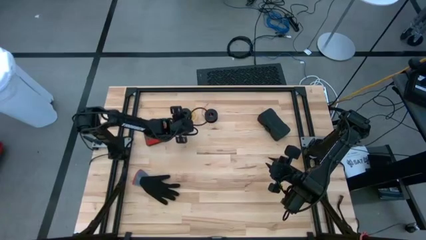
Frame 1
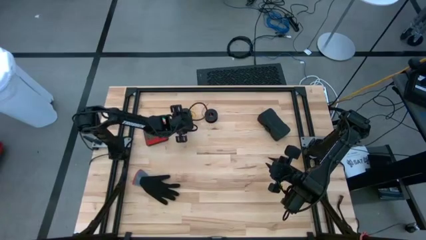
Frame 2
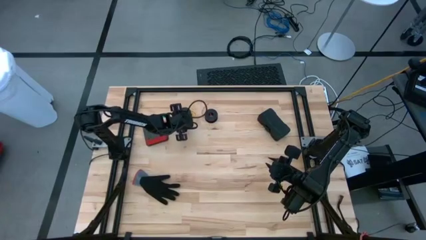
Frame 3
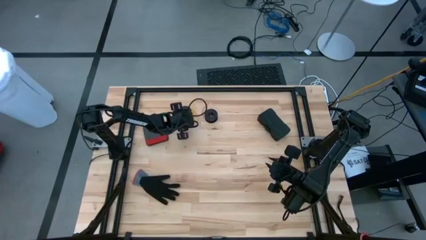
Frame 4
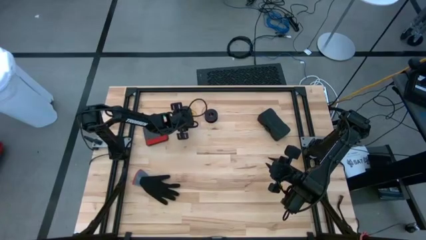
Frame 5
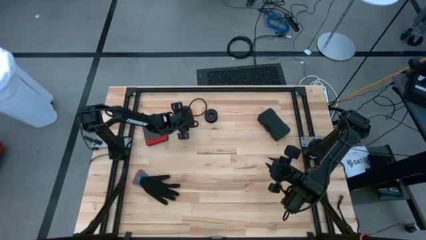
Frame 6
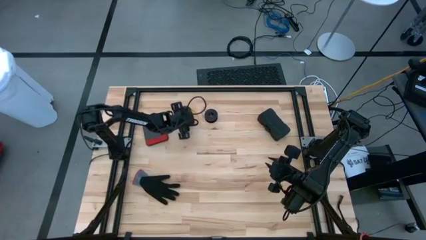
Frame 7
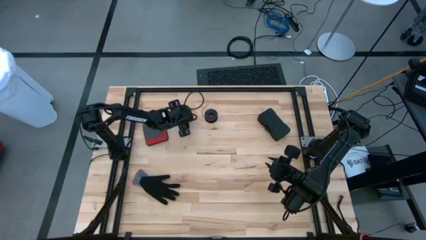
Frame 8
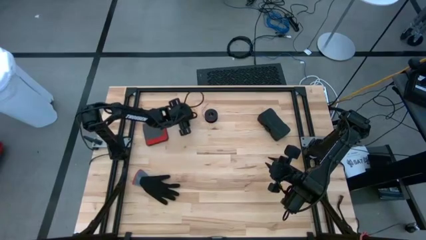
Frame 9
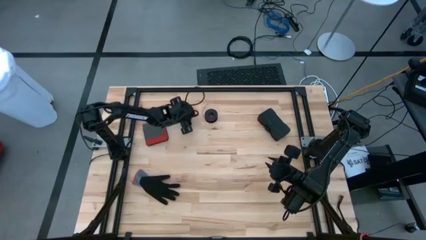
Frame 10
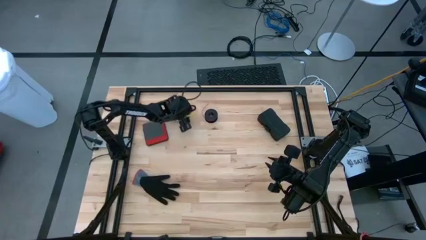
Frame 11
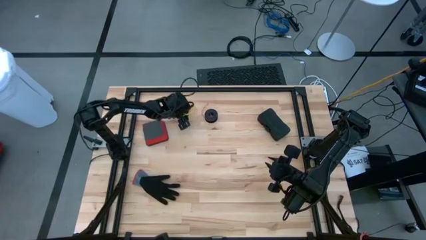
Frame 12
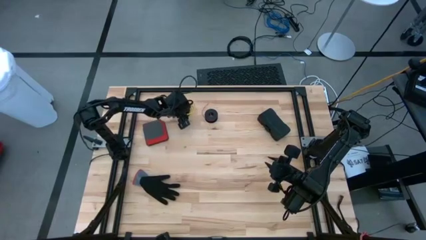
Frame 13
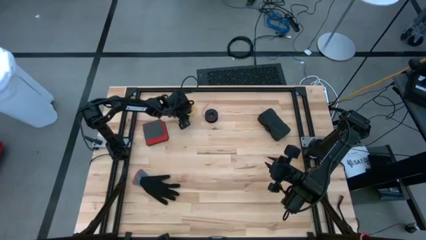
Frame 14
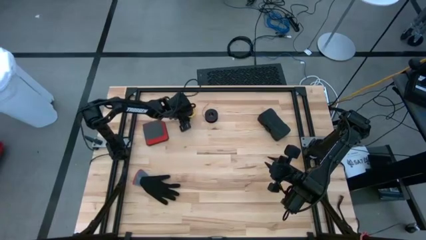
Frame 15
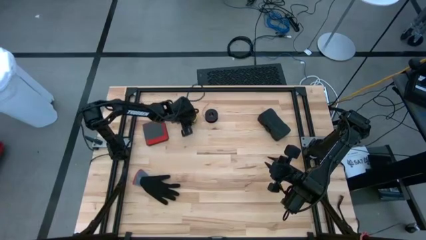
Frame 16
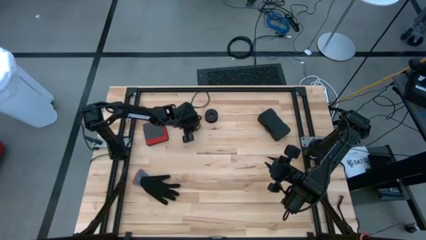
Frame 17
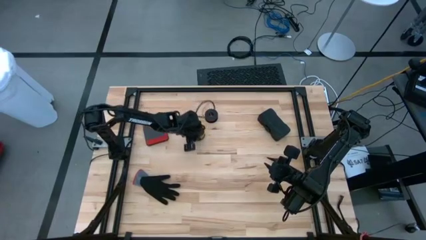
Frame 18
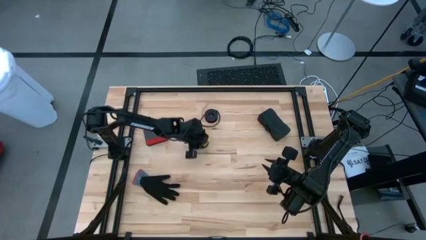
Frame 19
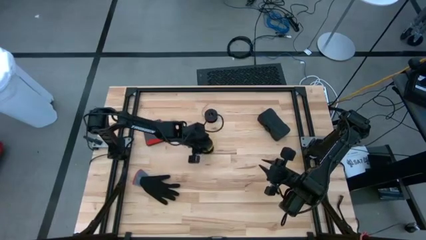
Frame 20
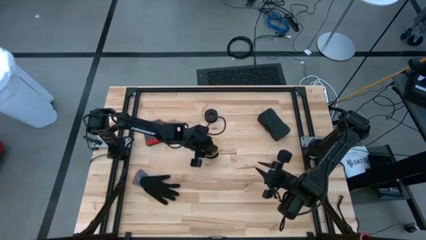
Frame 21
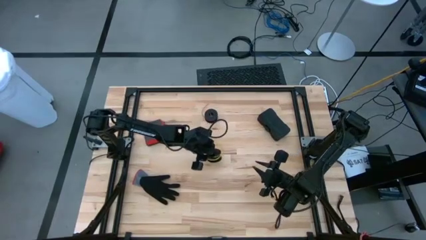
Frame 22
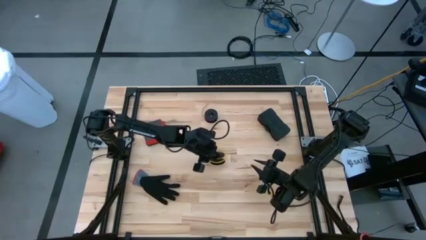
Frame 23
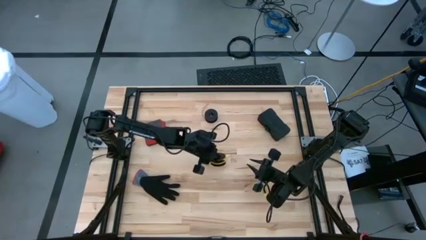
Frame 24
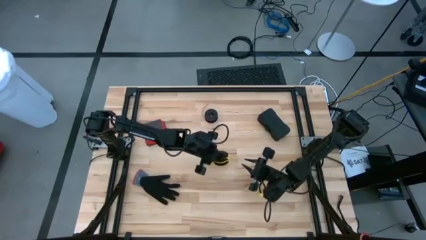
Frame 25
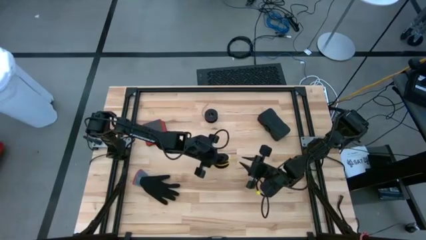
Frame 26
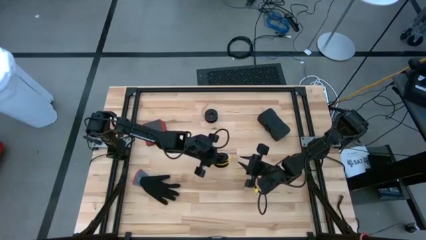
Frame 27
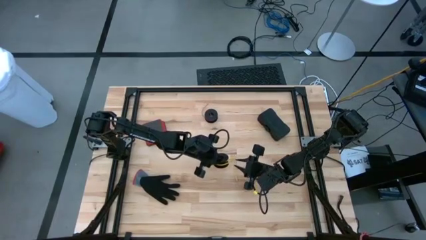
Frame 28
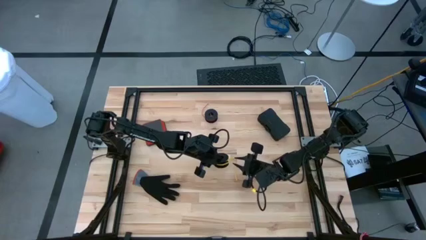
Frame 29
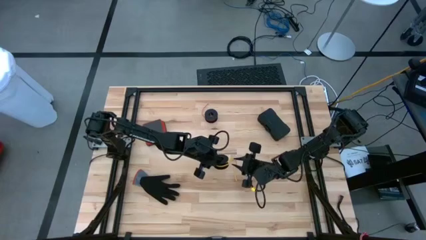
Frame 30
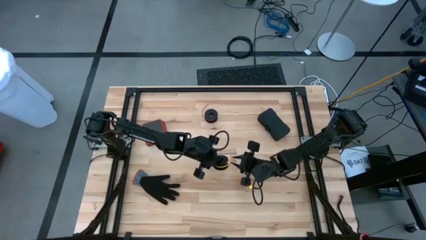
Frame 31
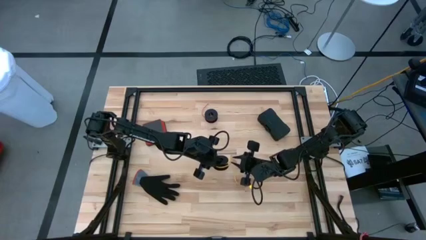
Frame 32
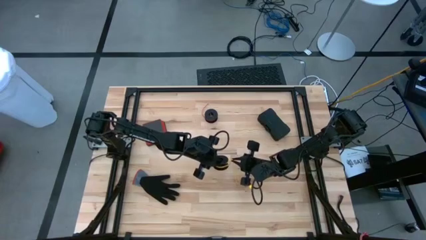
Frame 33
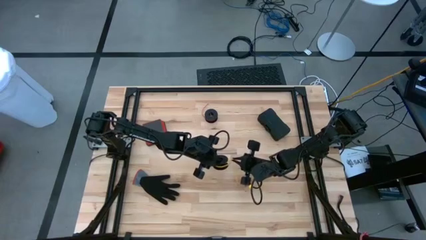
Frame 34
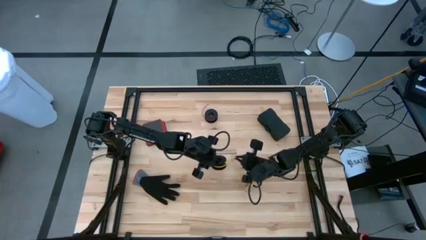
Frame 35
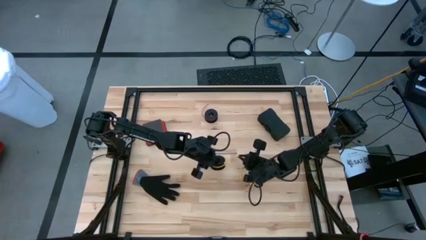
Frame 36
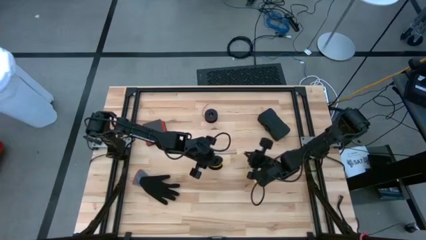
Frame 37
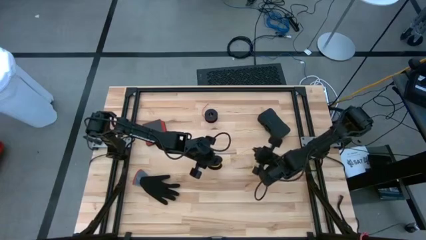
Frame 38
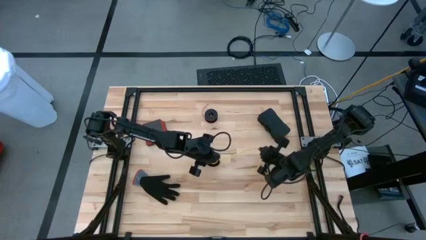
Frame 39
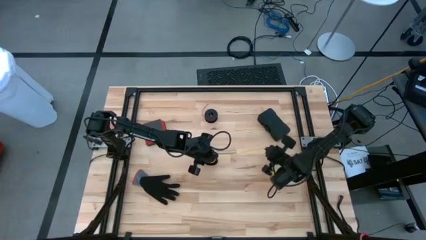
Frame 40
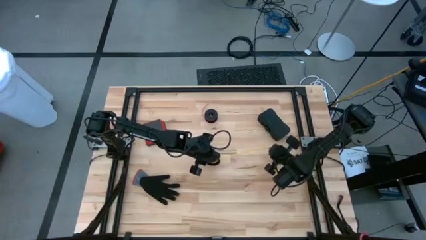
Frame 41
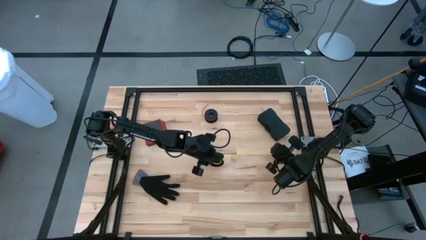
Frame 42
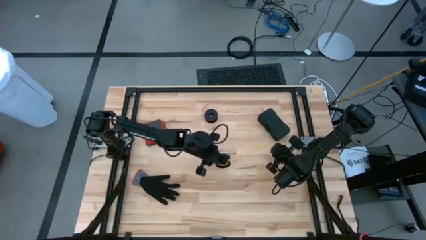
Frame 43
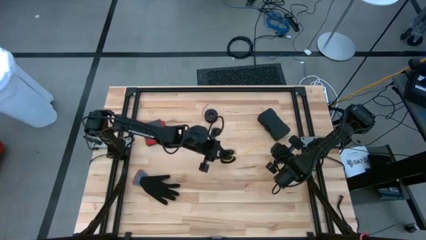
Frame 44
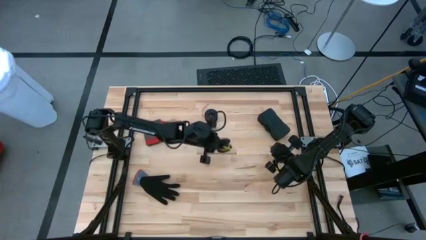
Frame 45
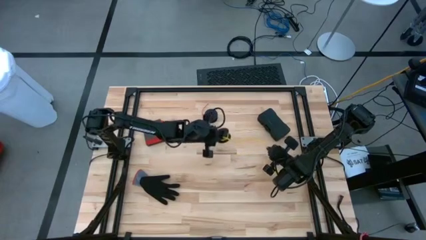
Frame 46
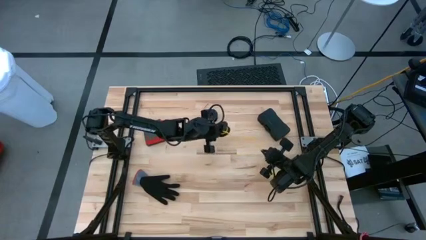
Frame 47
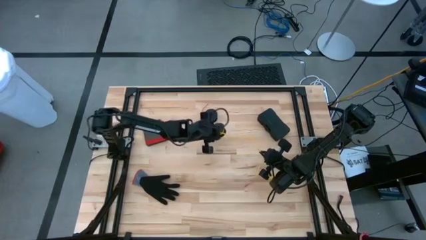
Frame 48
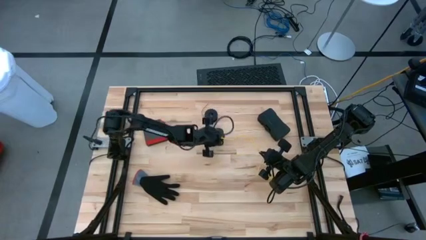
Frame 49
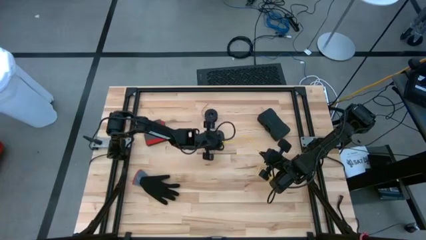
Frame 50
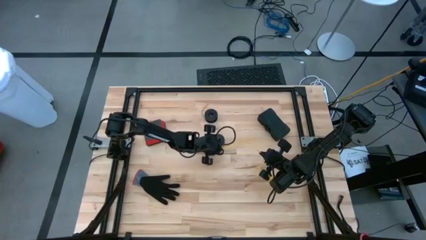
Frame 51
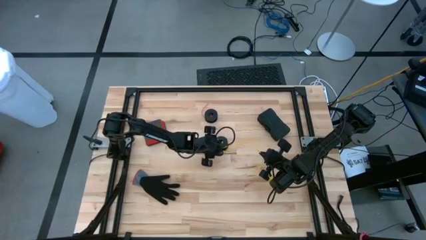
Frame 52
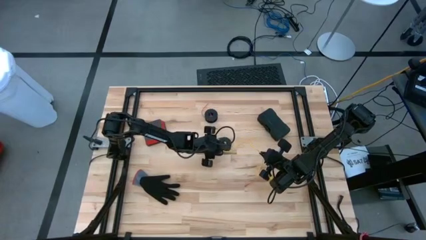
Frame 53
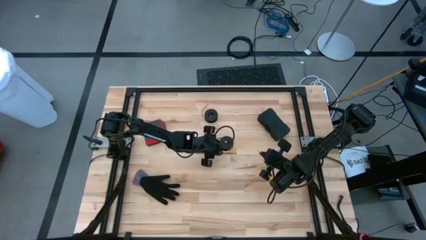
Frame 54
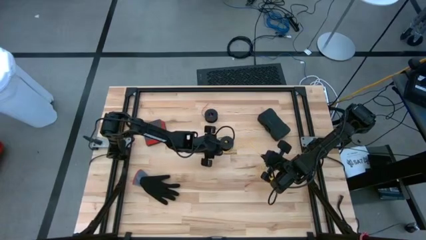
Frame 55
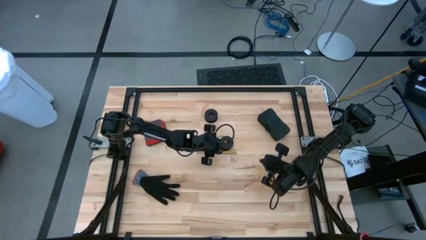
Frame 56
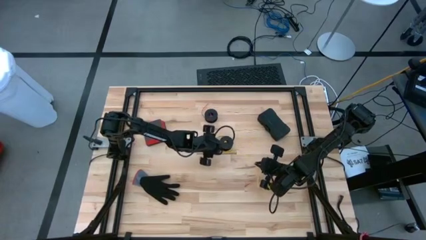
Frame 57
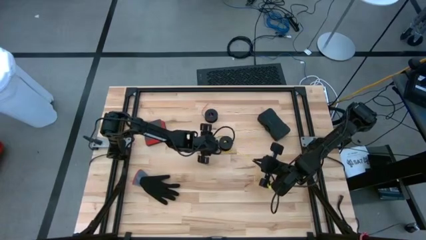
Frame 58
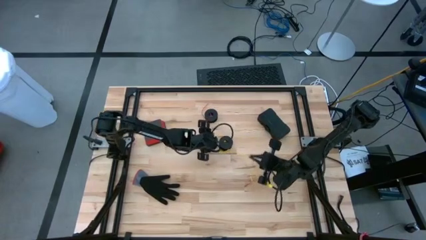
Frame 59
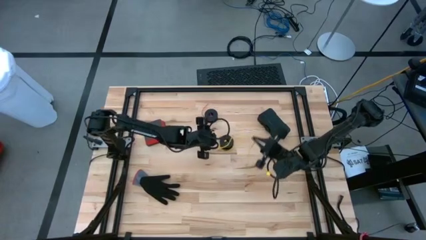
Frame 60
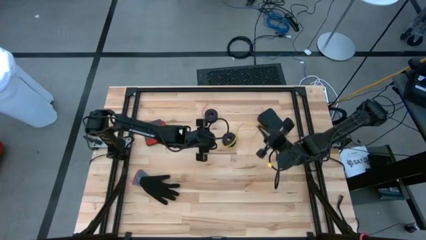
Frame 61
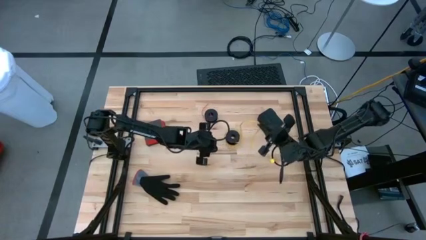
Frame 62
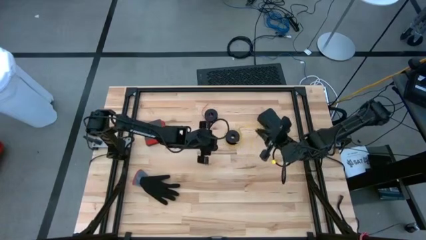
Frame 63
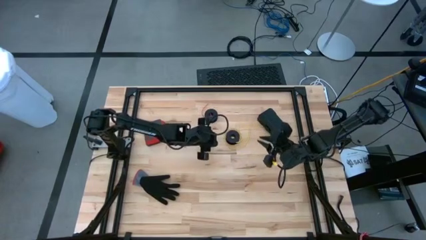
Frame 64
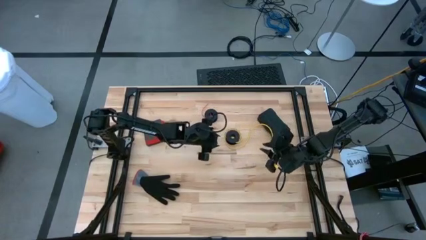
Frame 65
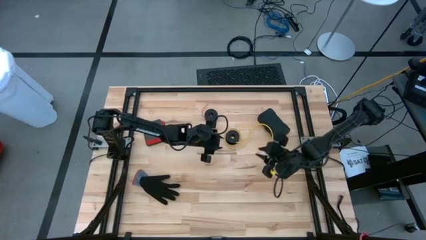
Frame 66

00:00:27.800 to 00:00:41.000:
Task: Coil cords
Uncoil the yellow wire from the spool
